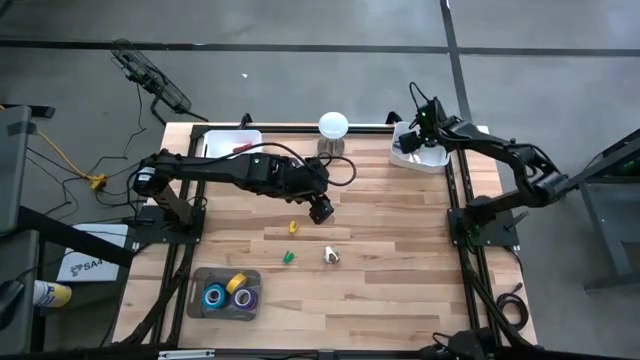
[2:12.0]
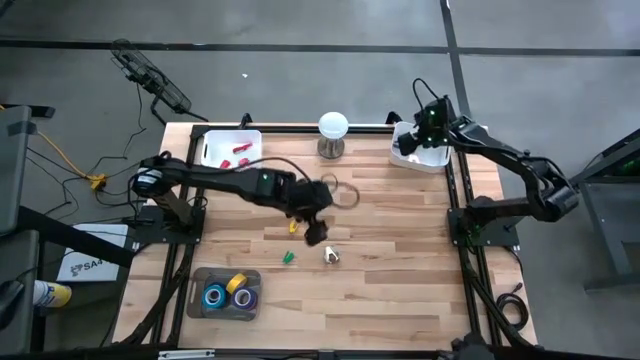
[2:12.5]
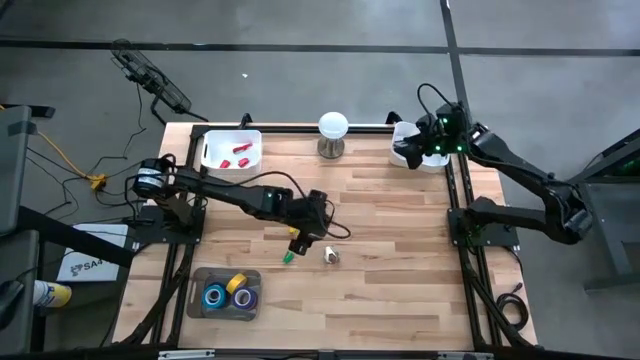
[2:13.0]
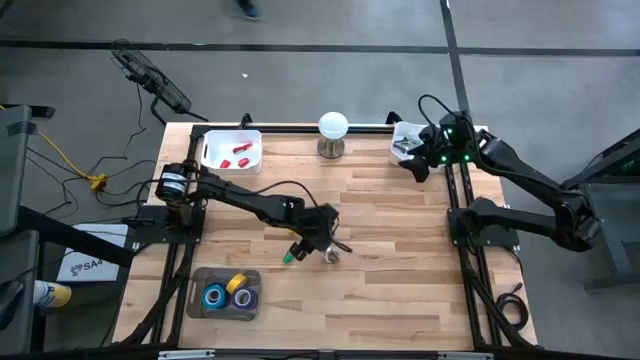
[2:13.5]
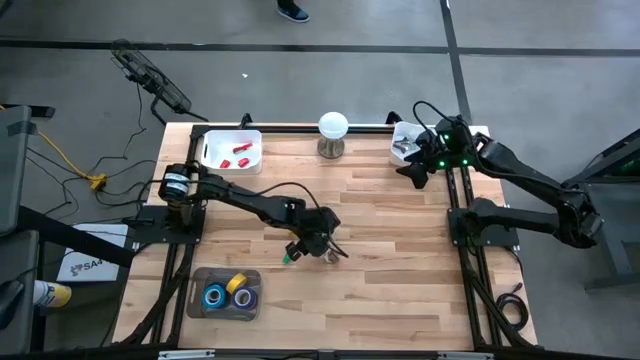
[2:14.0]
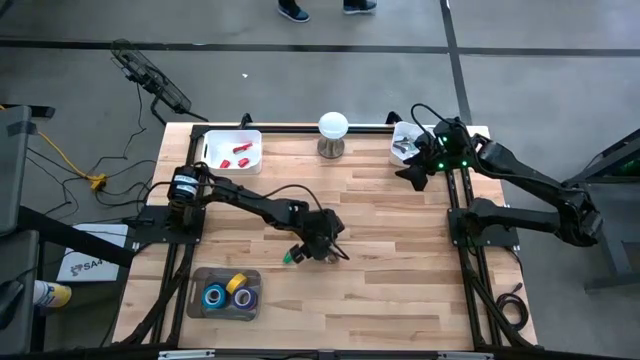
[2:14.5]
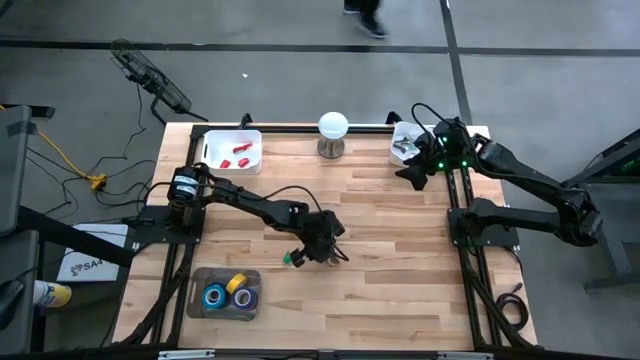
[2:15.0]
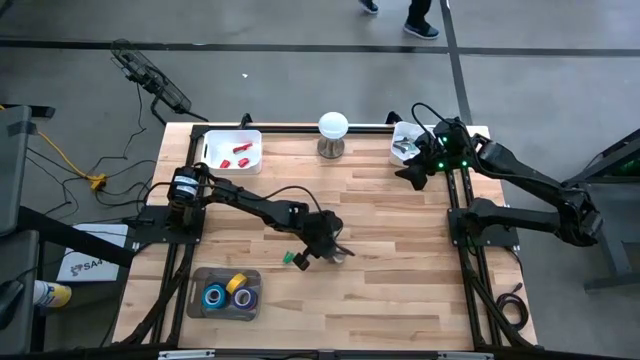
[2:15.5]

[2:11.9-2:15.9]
Task: Pick and place Stapler, Stapler remover, tape
Put the gray staple remover into the right white bin

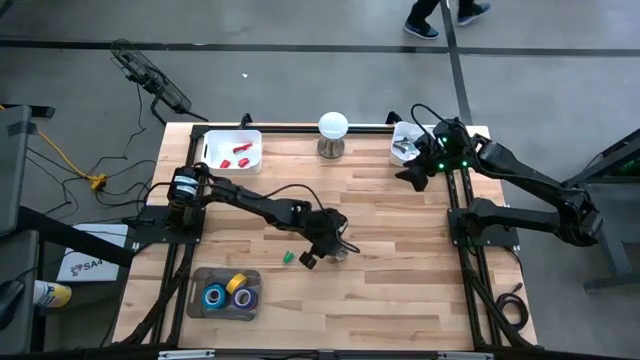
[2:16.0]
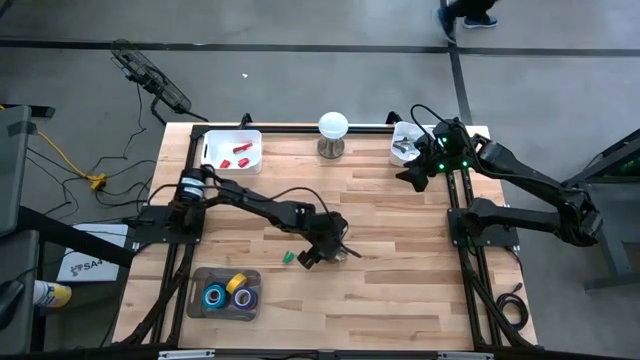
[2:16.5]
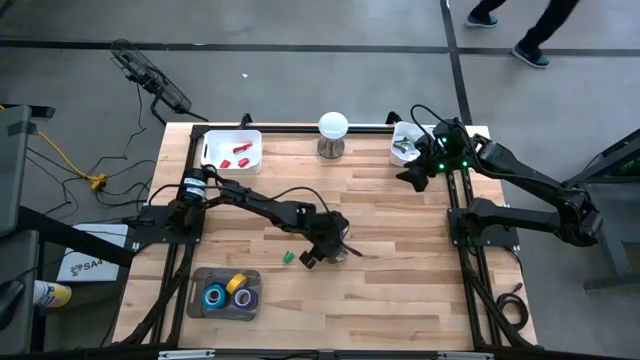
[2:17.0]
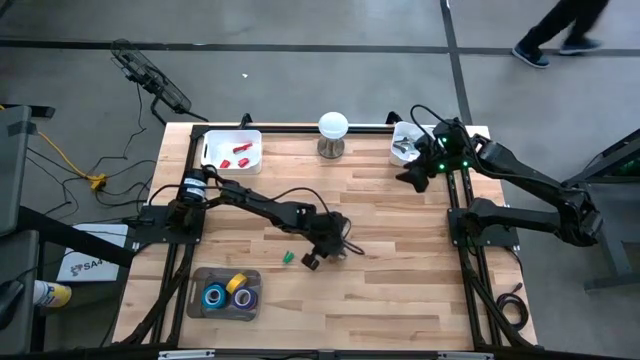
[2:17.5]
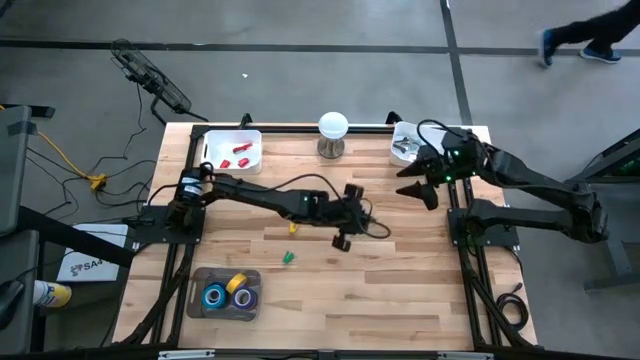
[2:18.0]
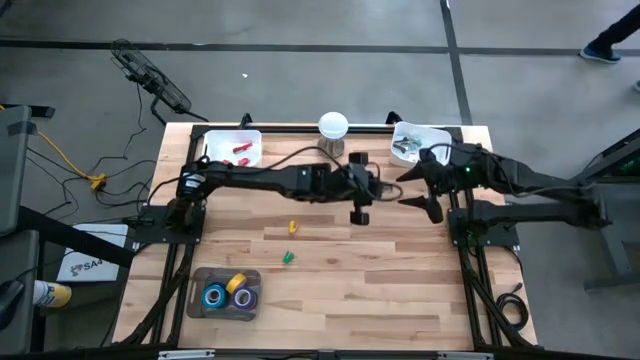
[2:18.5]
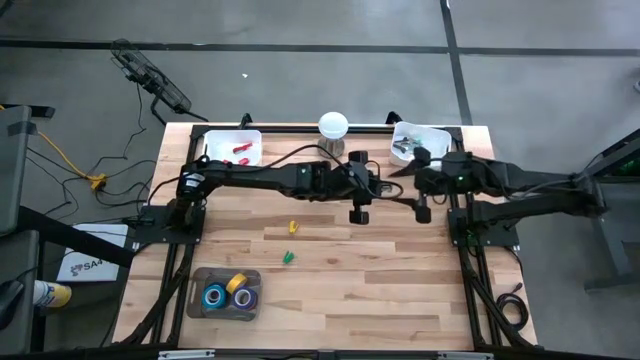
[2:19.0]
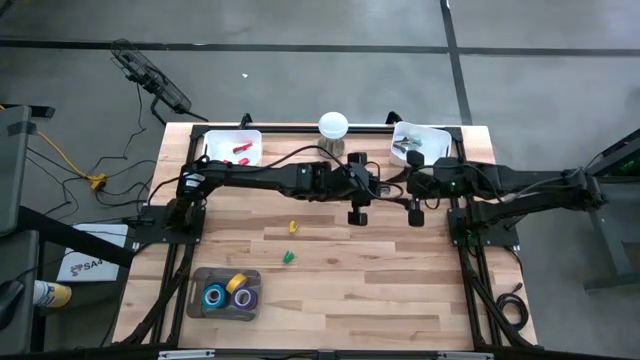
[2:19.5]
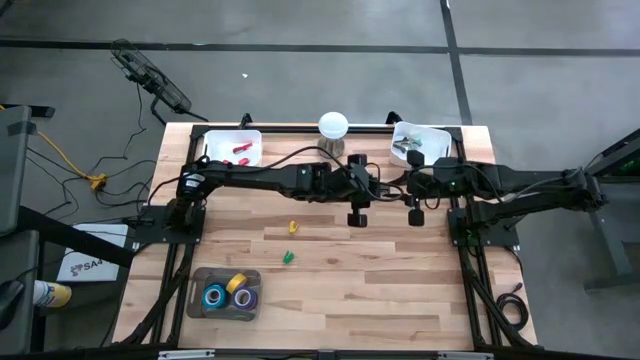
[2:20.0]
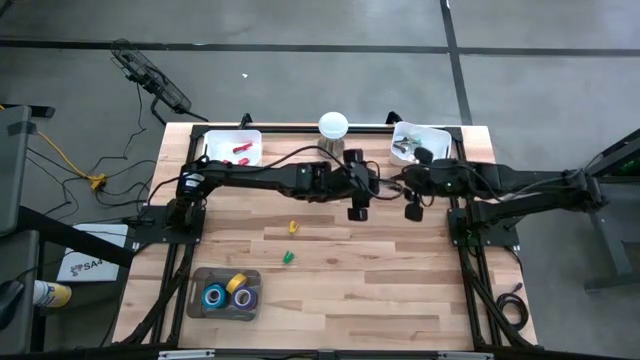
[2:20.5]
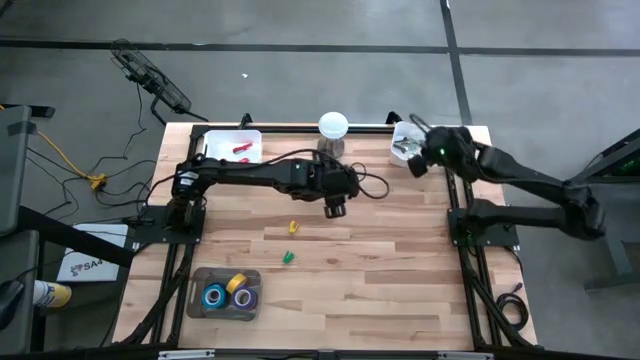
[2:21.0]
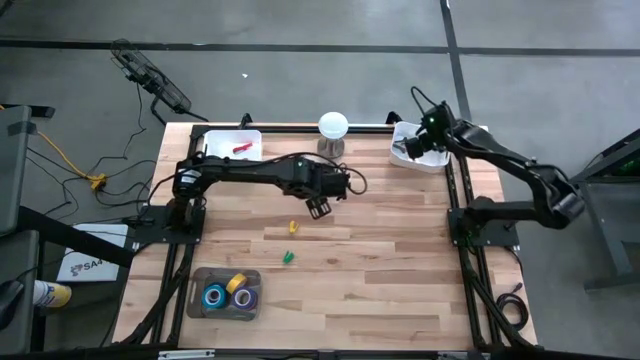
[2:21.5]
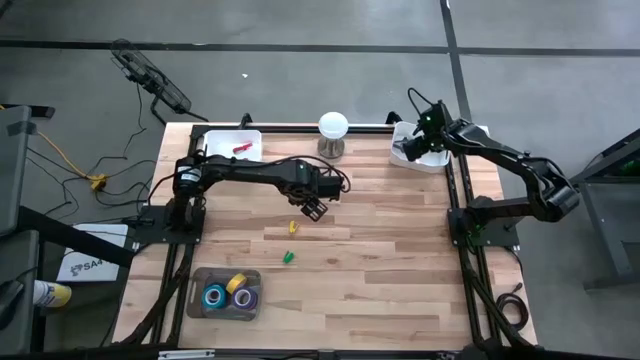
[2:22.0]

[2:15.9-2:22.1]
Put the gray staple remover into the right white bin

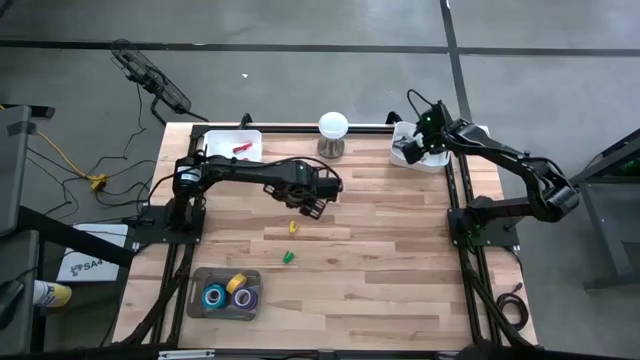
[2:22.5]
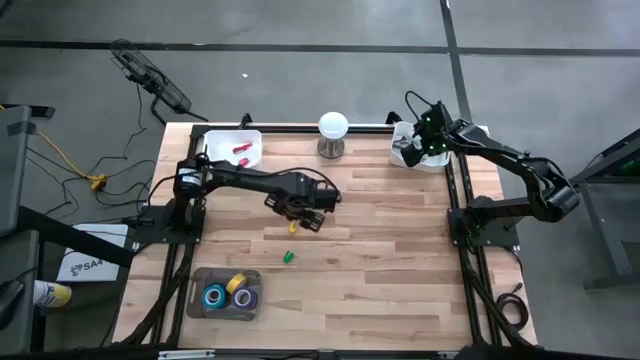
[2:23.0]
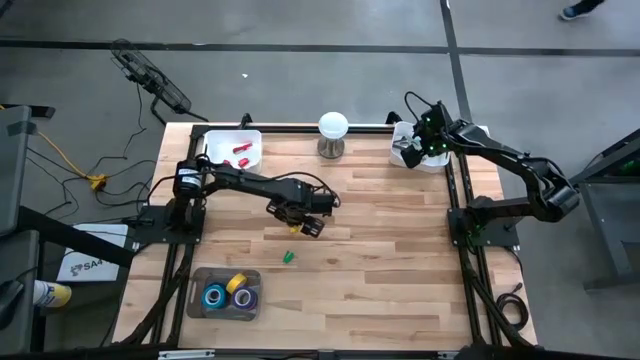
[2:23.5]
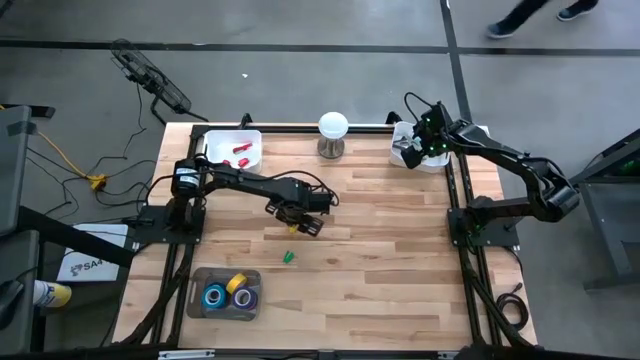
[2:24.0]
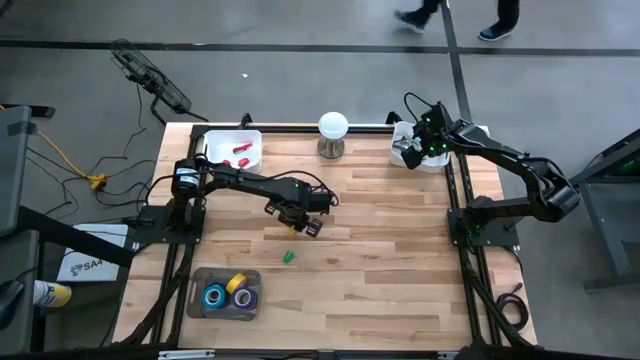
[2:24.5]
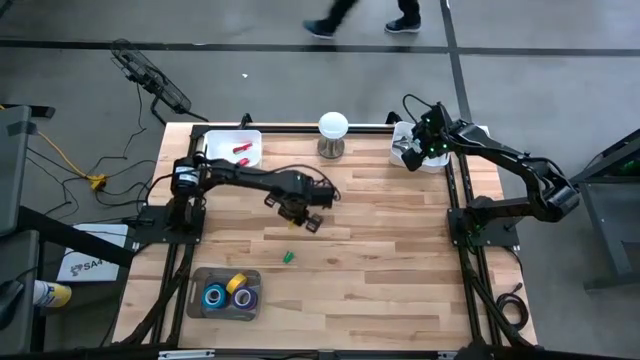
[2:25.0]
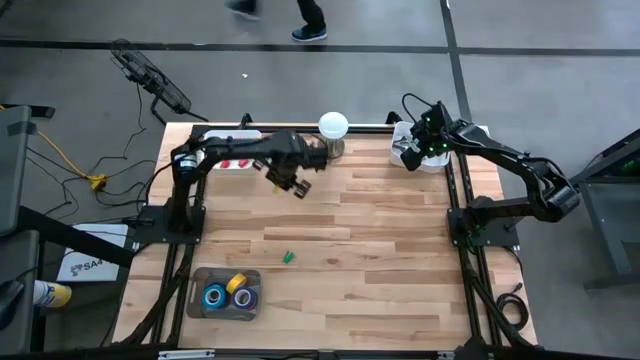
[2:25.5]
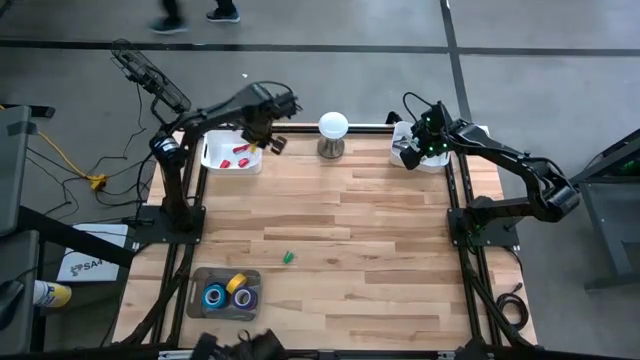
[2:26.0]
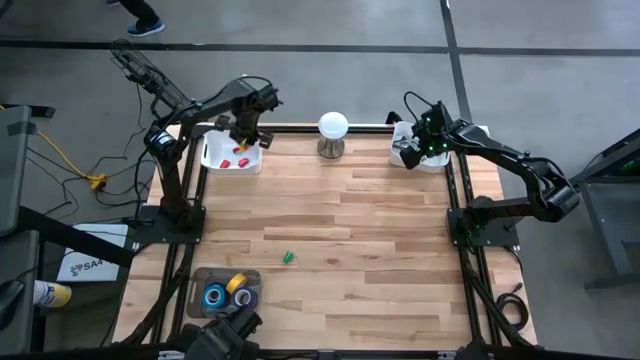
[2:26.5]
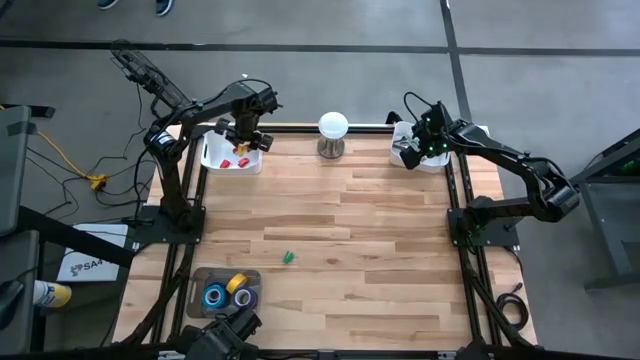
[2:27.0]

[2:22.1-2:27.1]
Put the yellow stapler into the left white bin

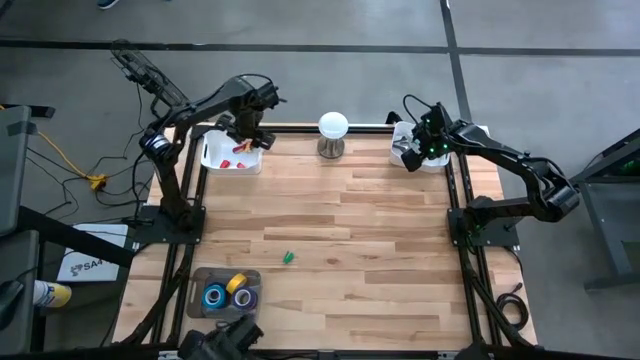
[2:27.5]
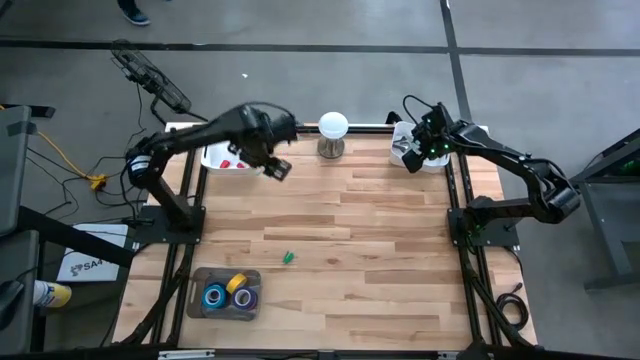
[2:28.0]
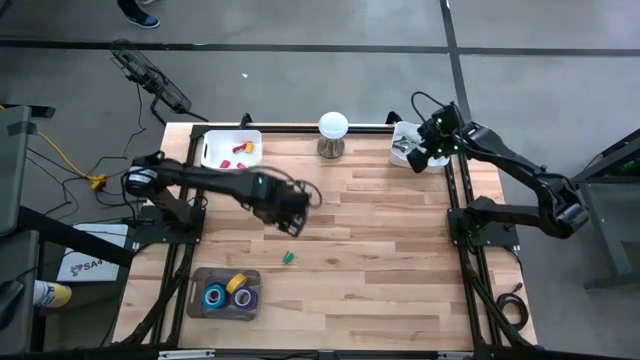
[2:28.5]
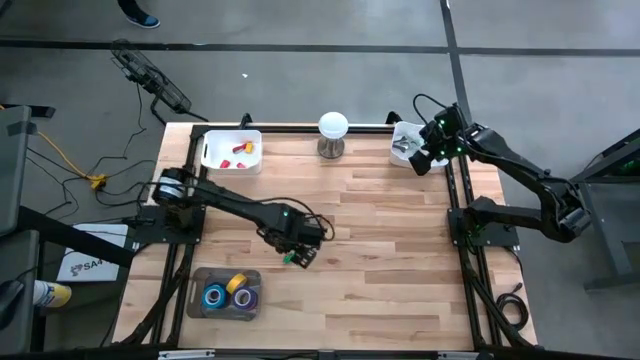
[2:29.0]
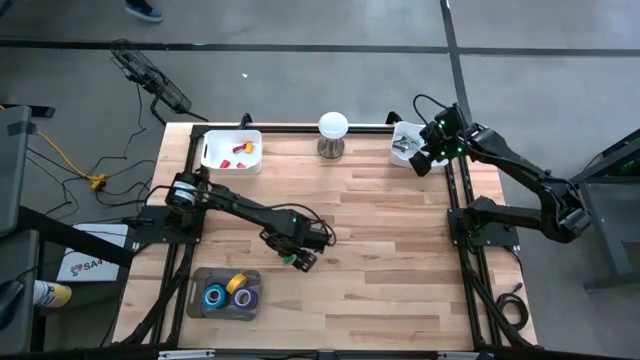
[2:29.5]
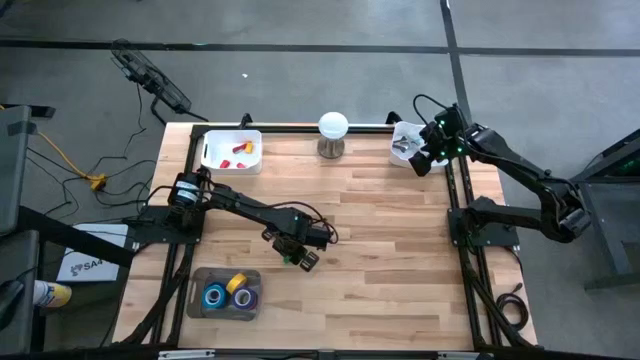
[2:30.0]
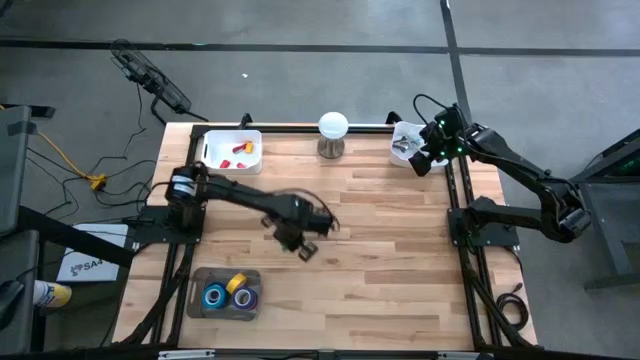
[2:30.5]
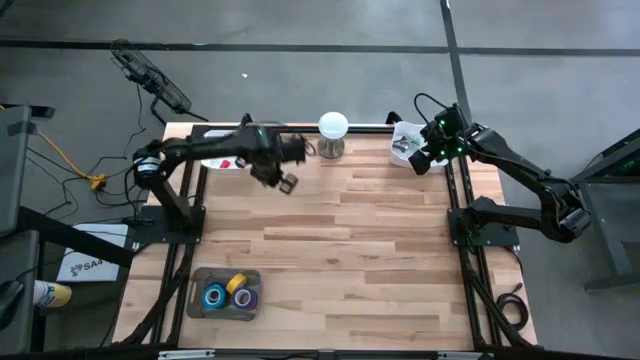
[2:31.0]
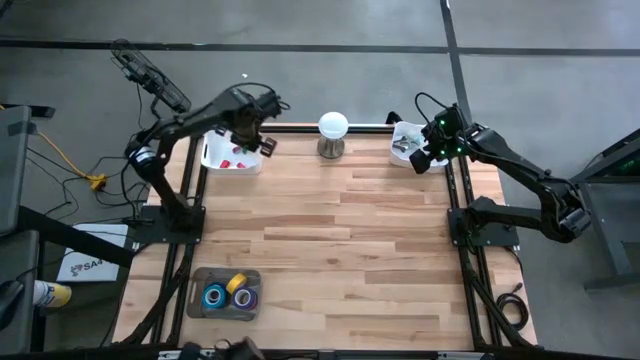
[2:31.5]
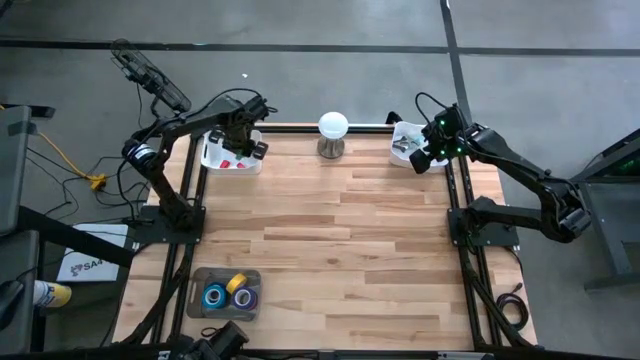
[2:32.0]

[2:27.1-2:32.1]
Put the green stapler into the left white bin

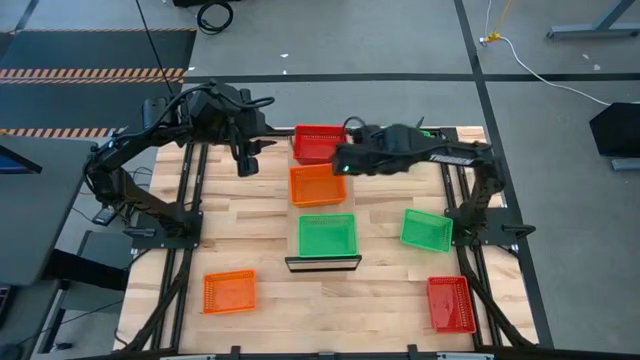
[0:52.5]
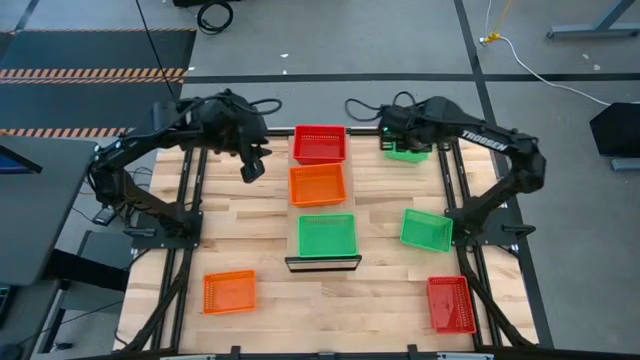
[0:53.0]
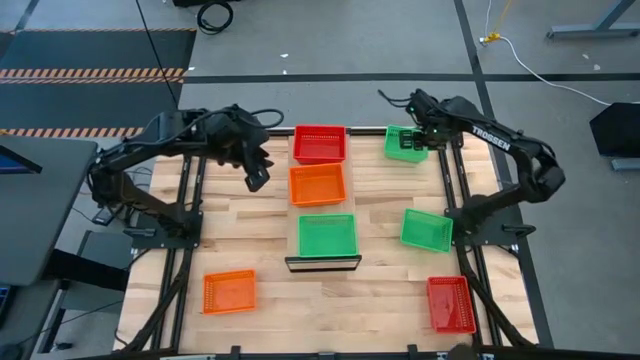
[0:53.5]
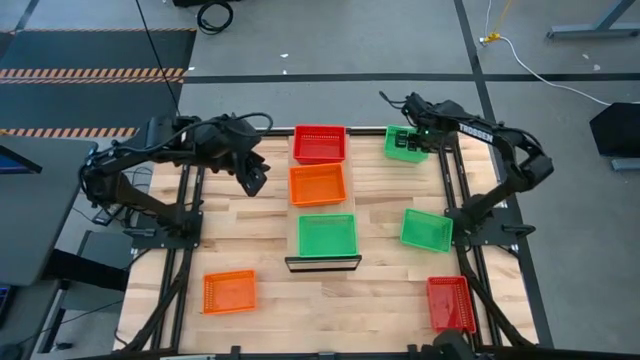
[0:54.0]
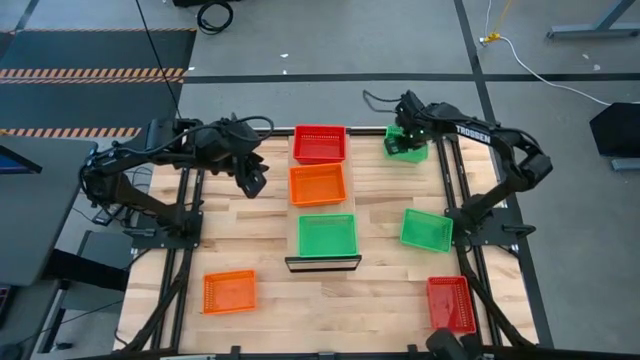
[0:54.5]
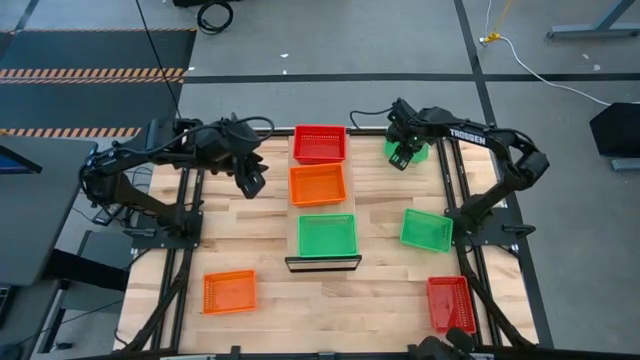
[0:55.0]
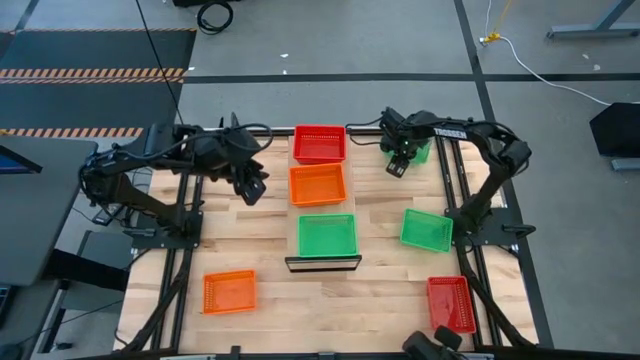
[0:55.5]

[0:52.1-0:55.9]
Task: Stack baskets on shelf by color
Stack the top green basket on top of the green basket on the shelf
